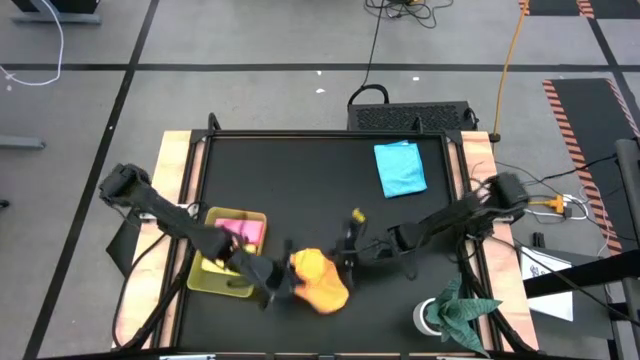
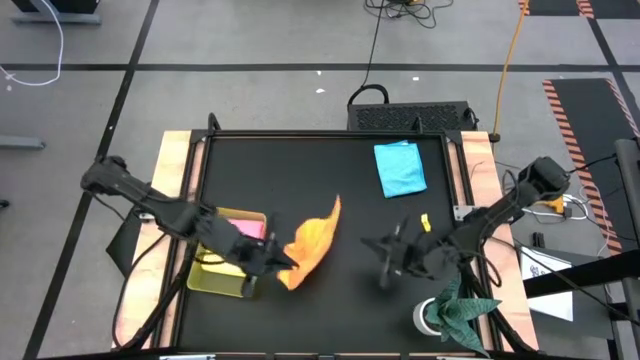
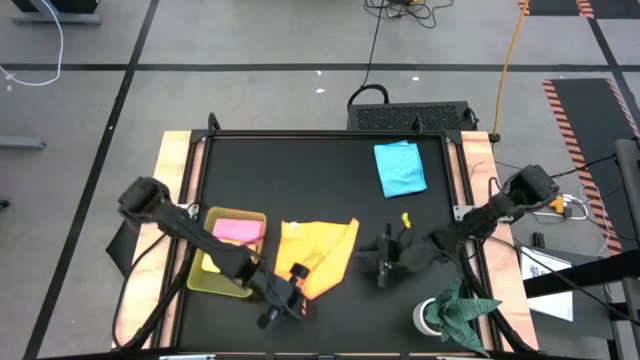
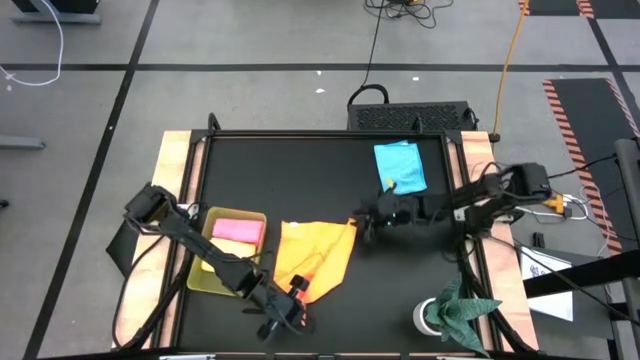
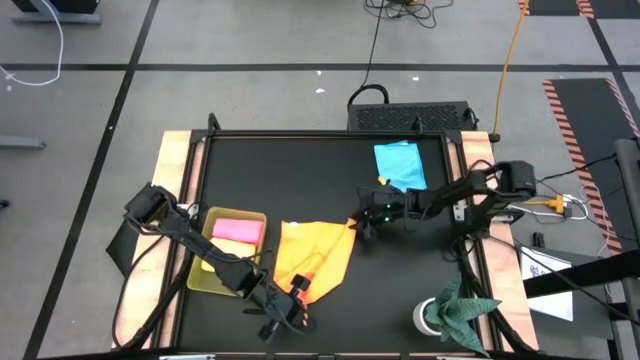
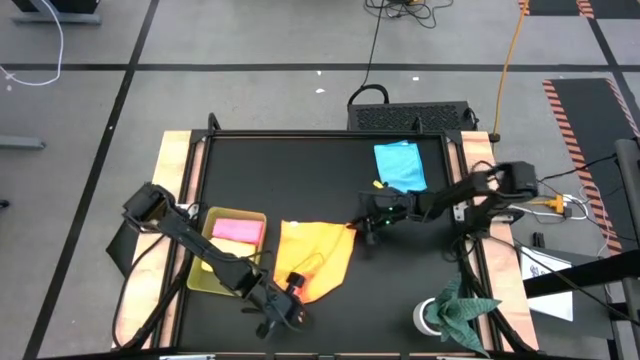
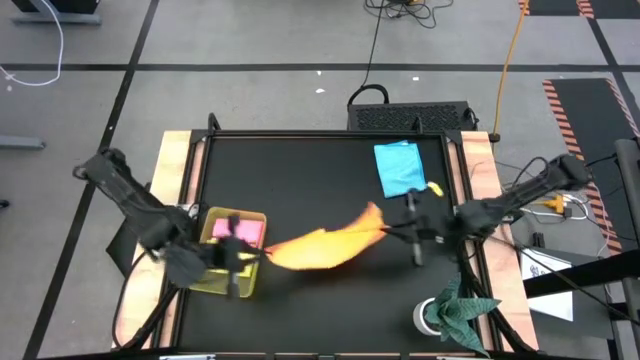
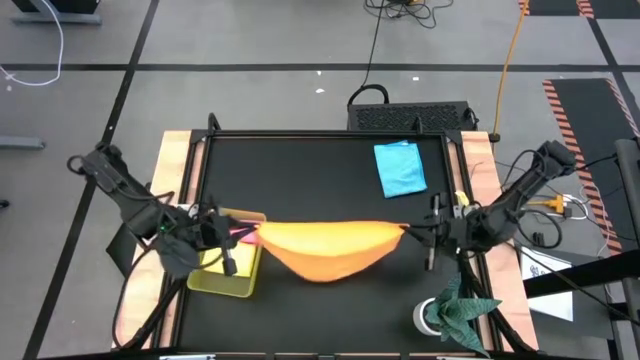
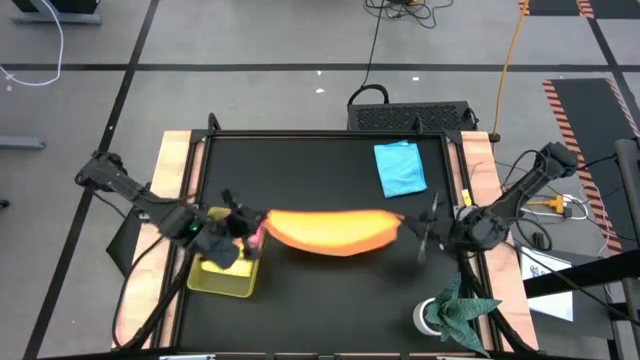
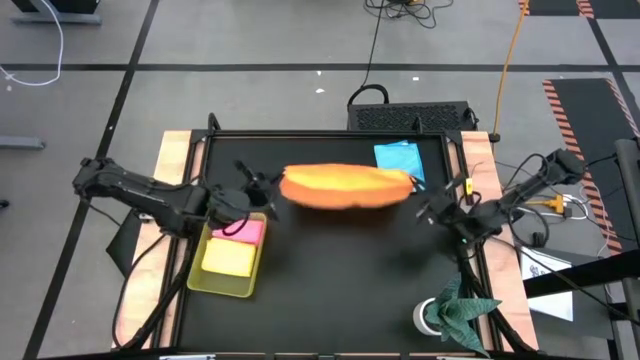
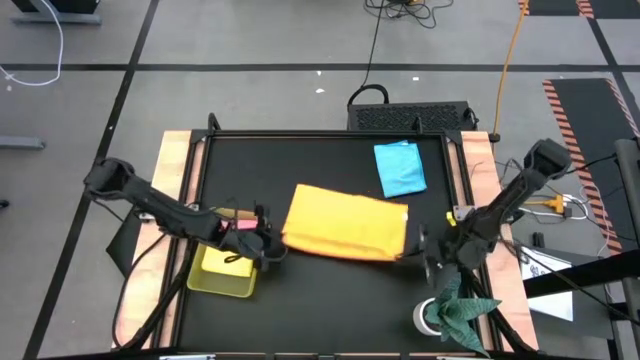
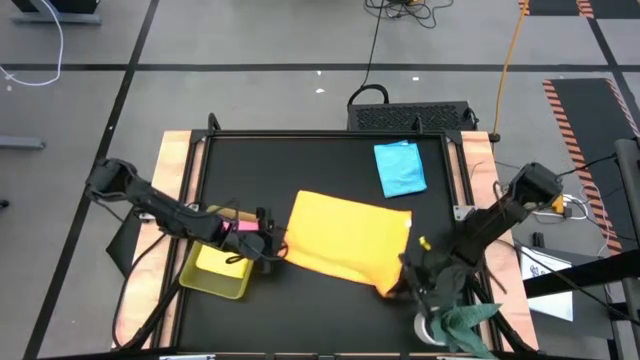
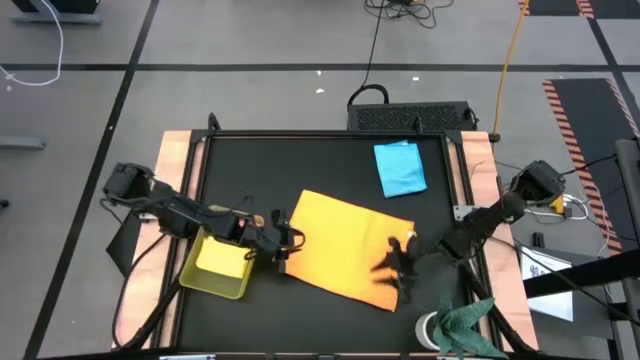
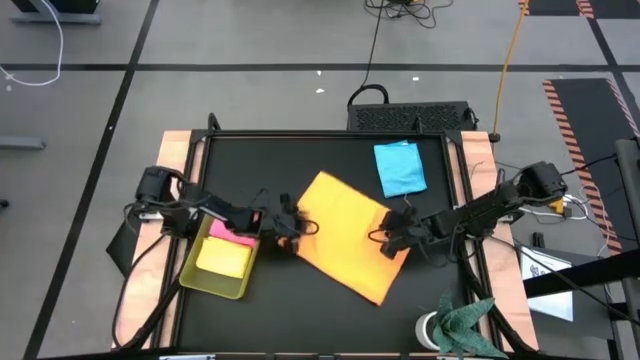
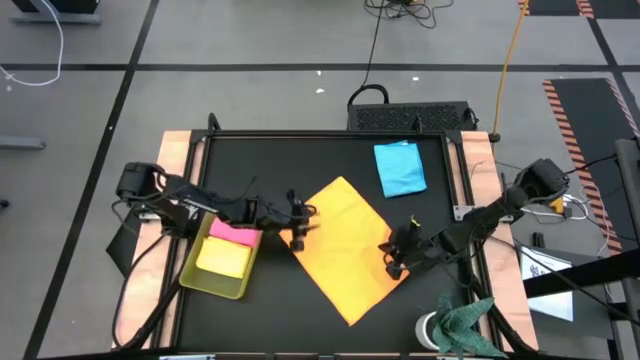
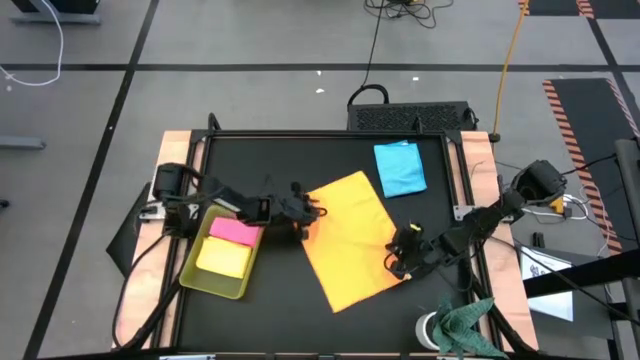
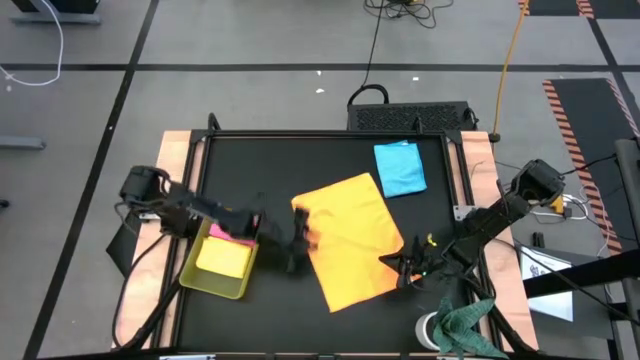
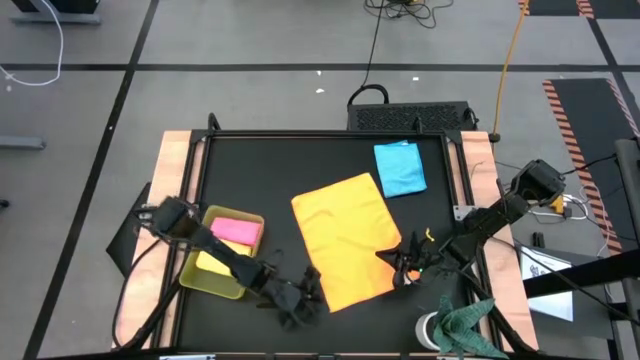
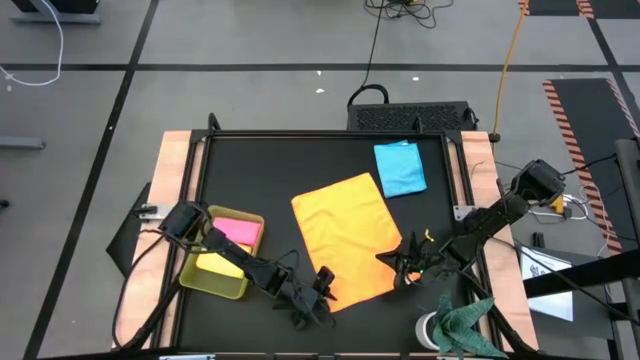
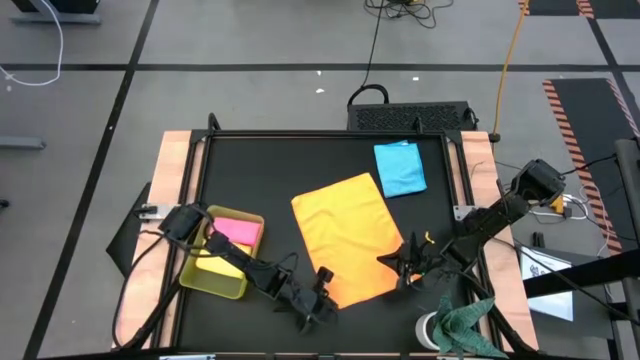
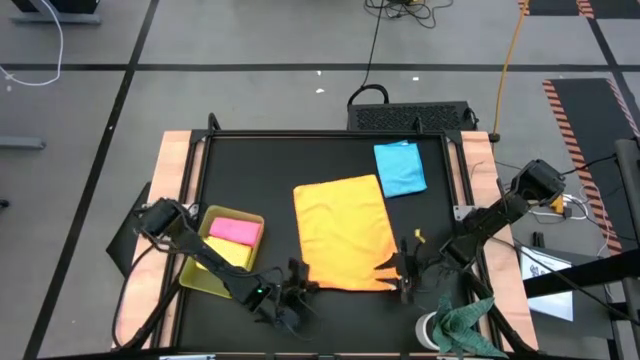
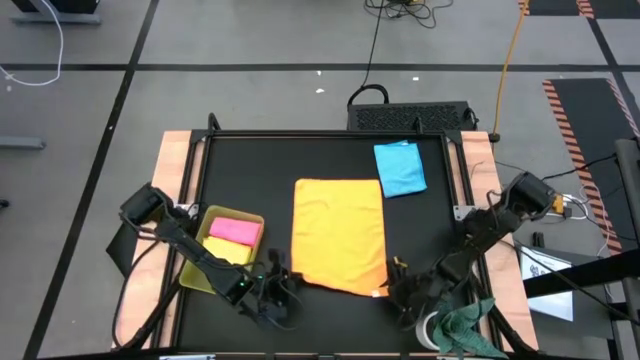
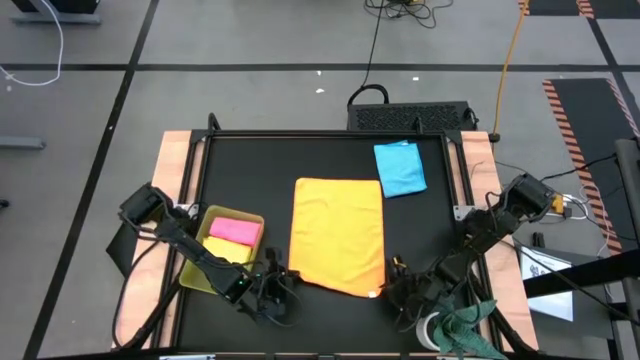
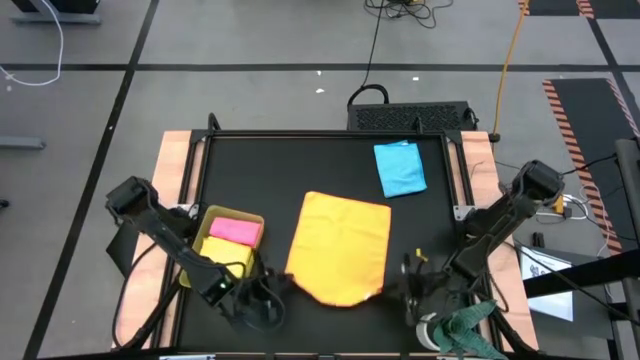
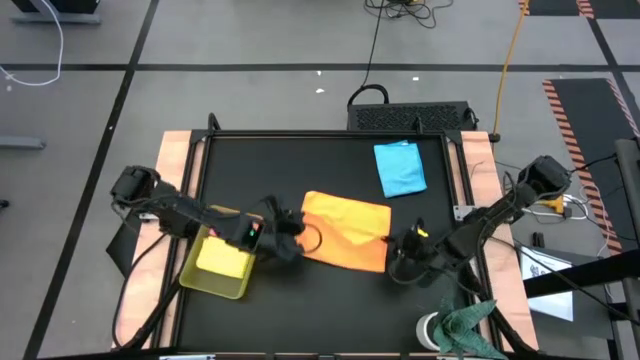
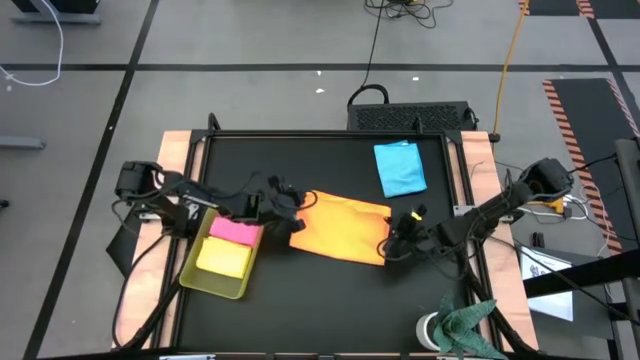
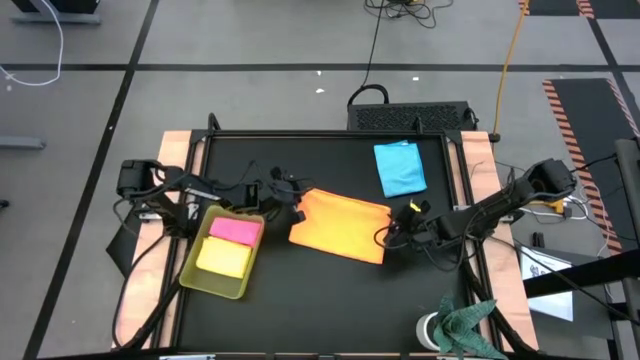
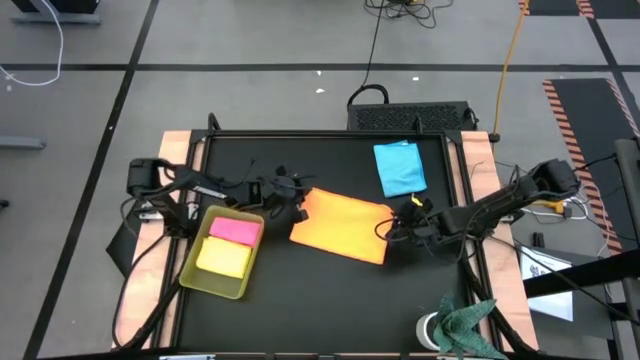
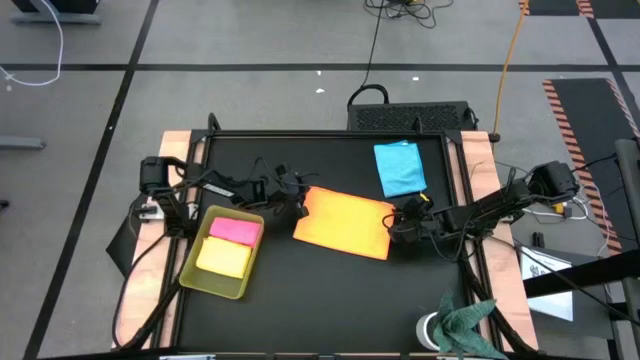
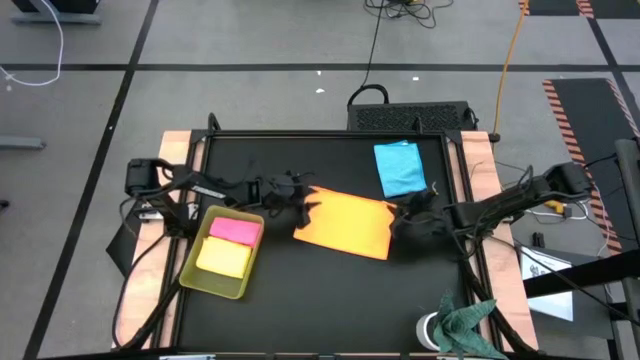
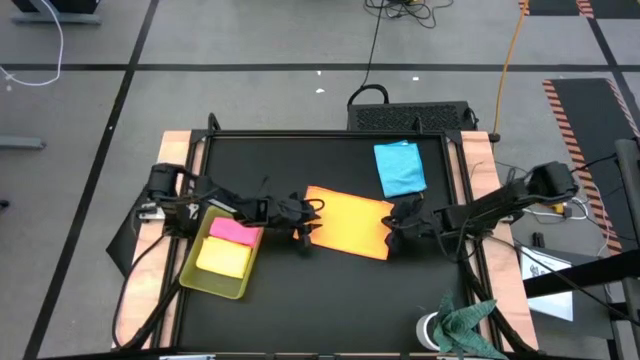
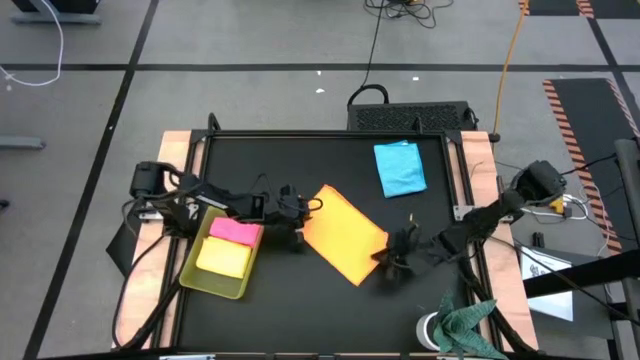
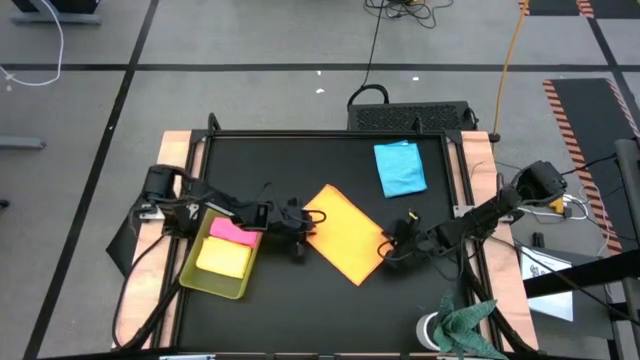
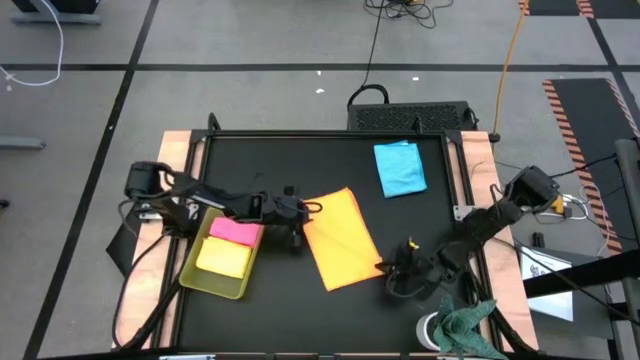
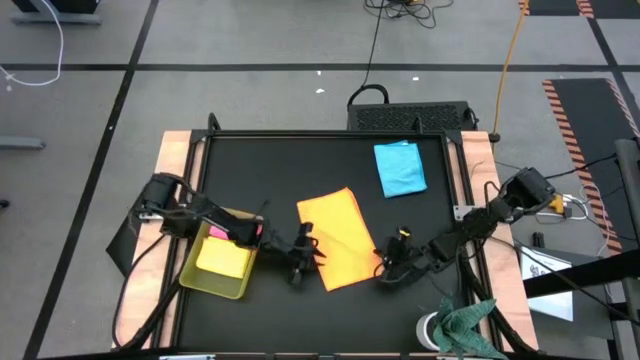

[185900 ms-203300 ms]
Task: Fold microfiber towels
Fold the orange microfiber towel

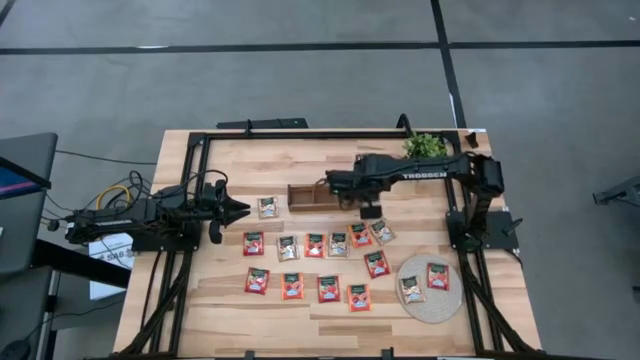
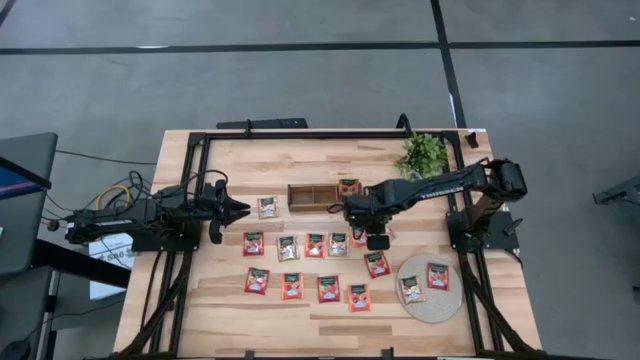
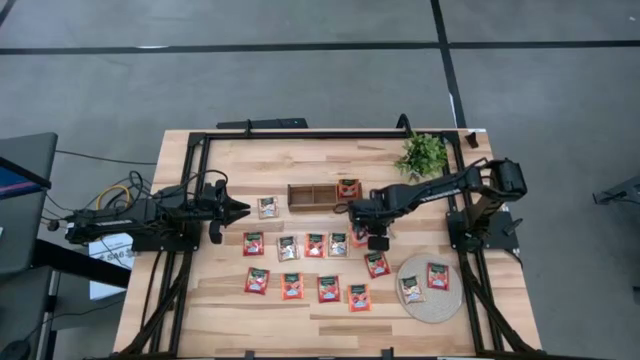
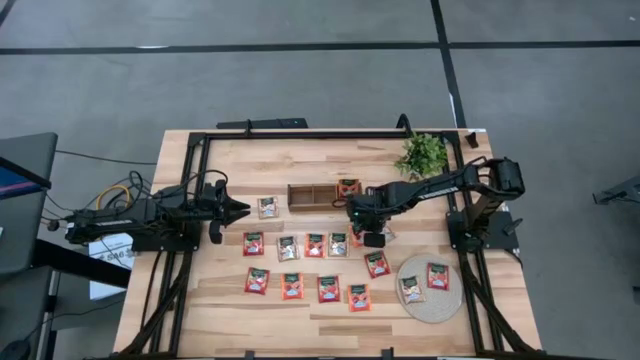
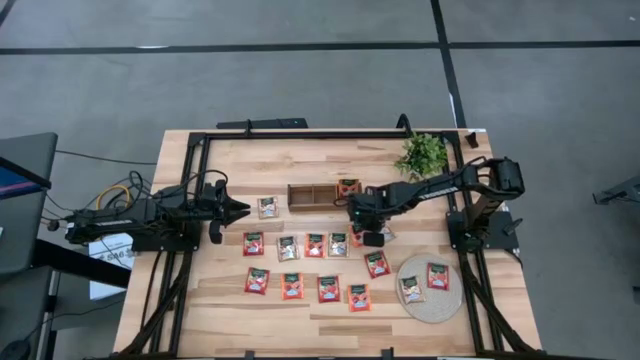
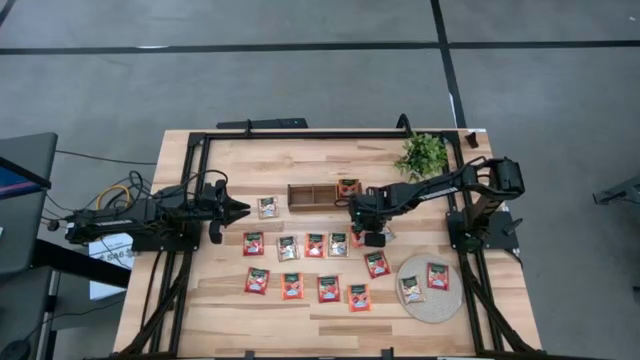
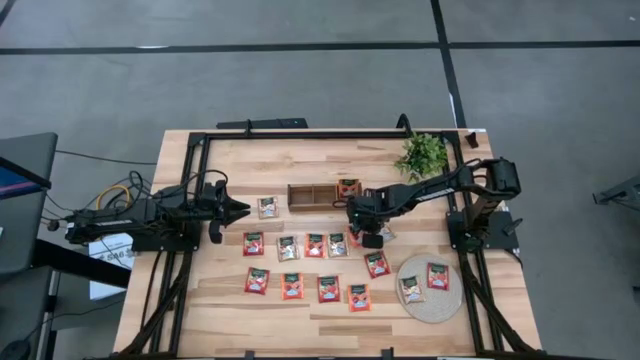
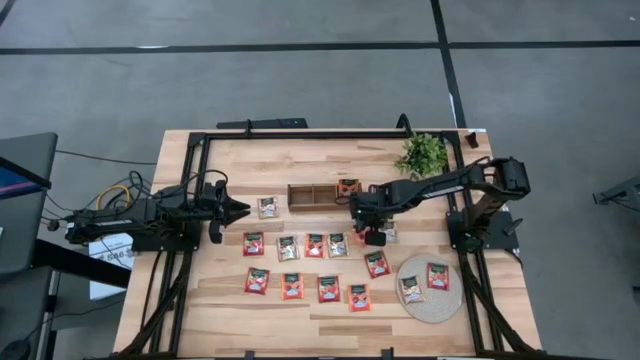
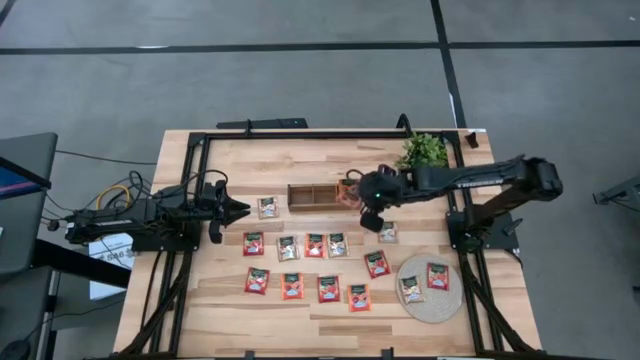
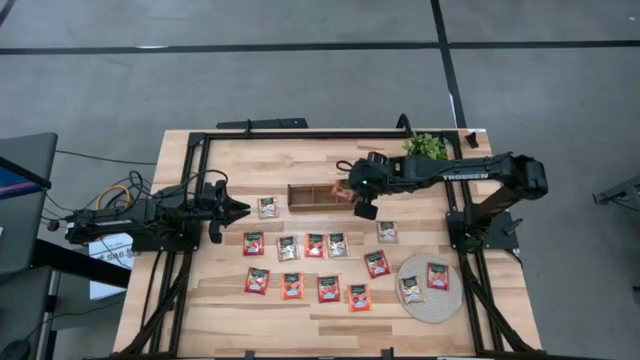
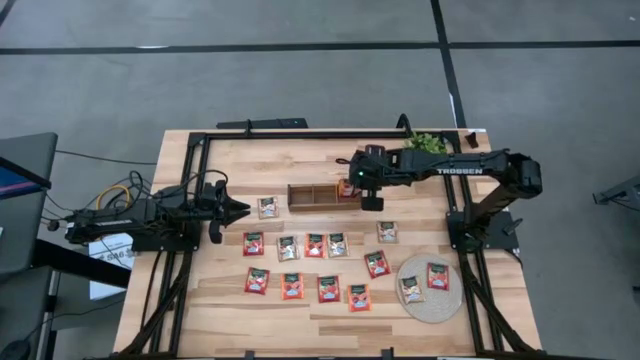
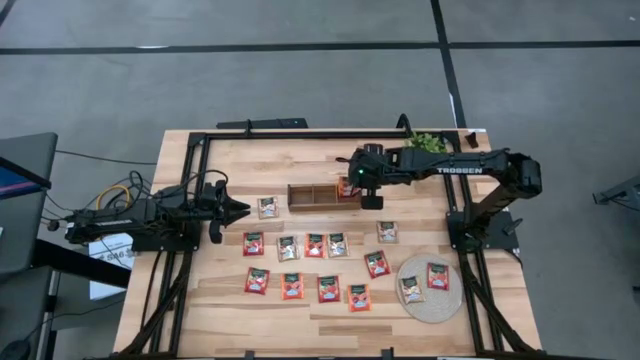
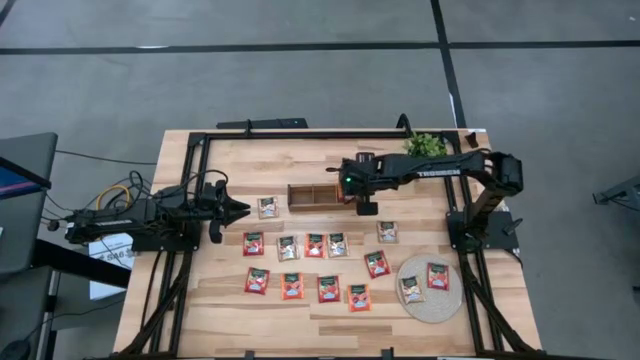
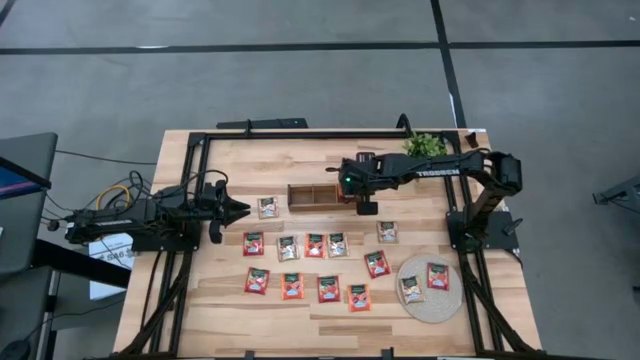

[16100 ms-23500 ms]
Task: Pick & Place Tea
Put the orange tea bag into the right section of the wooden organizer
